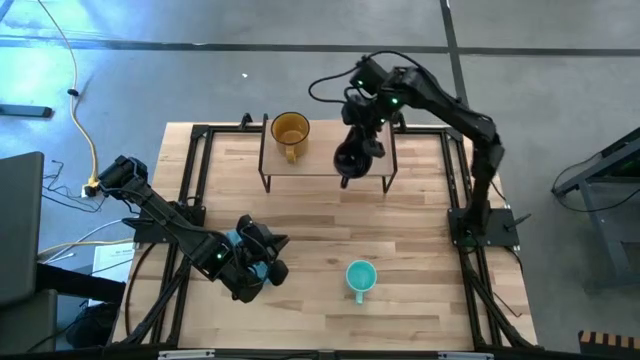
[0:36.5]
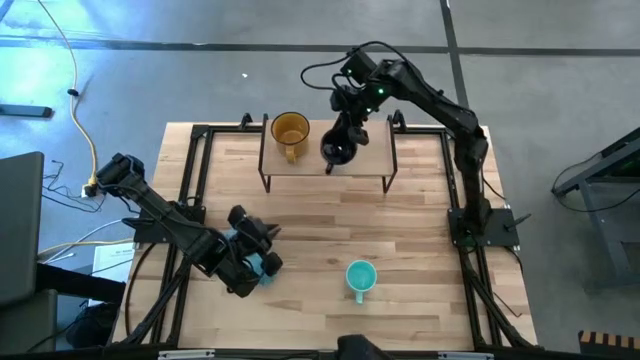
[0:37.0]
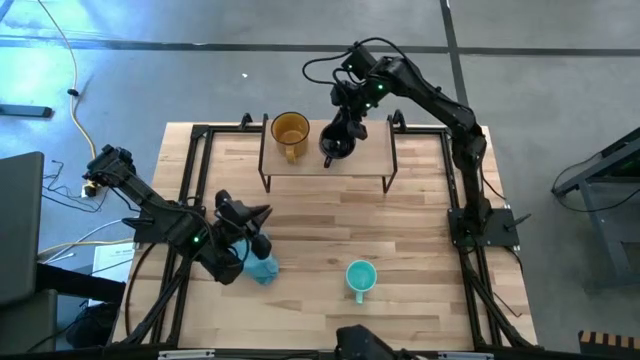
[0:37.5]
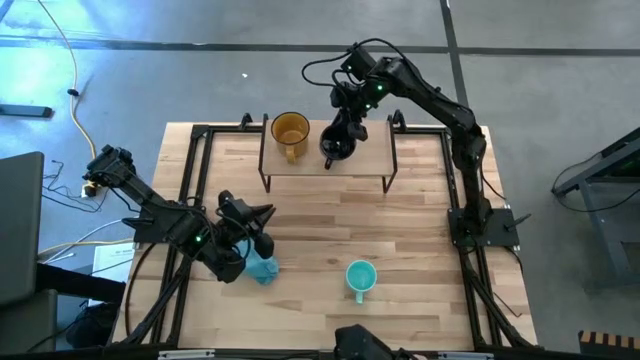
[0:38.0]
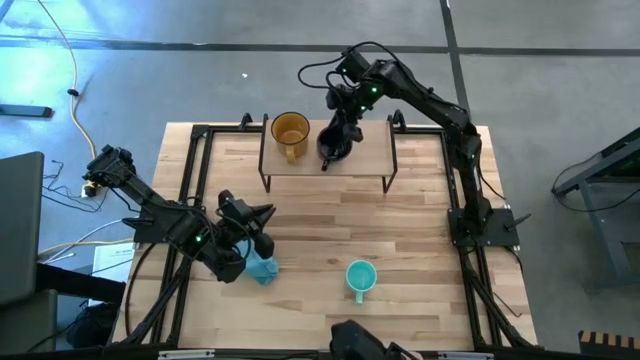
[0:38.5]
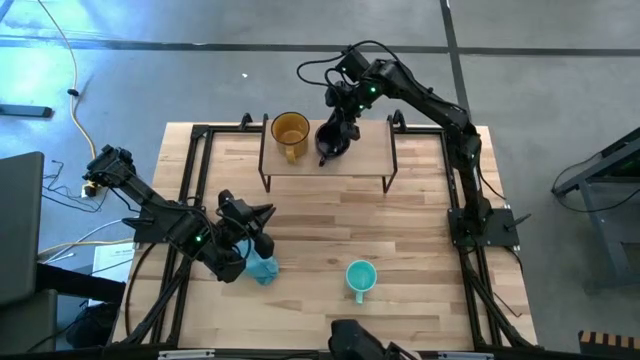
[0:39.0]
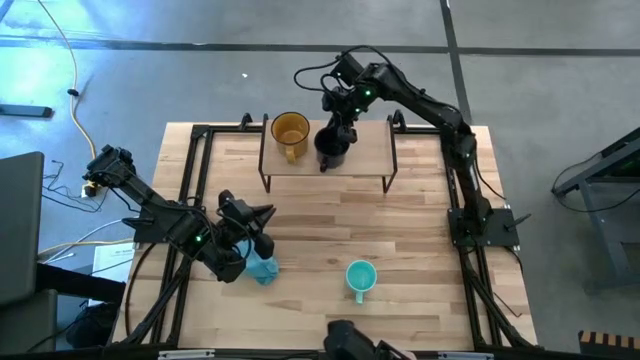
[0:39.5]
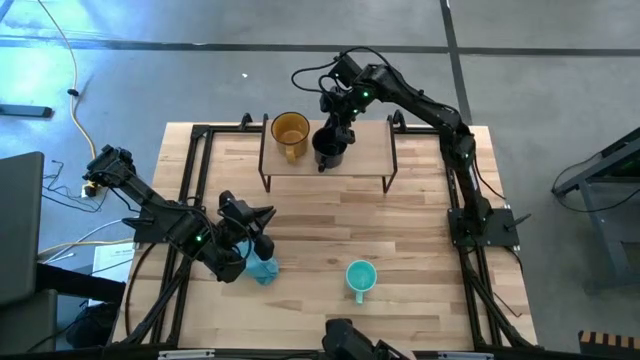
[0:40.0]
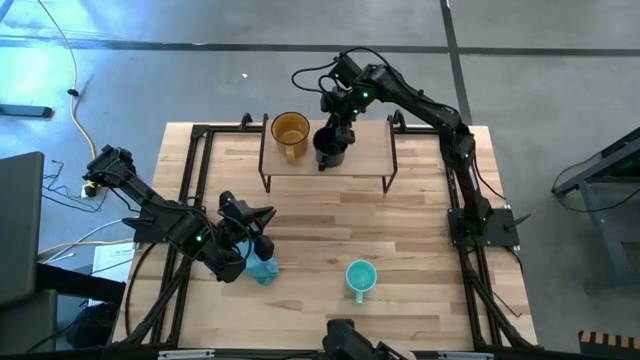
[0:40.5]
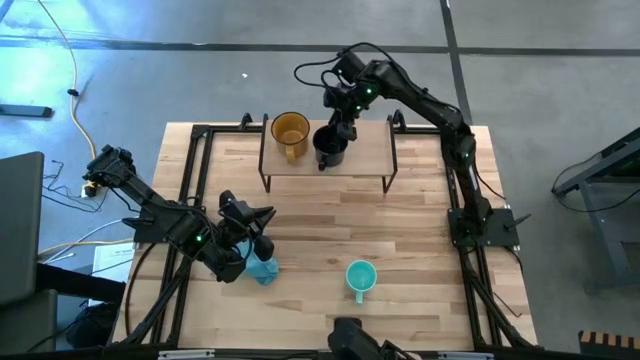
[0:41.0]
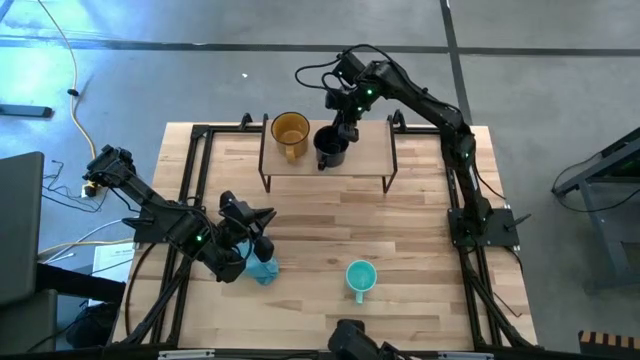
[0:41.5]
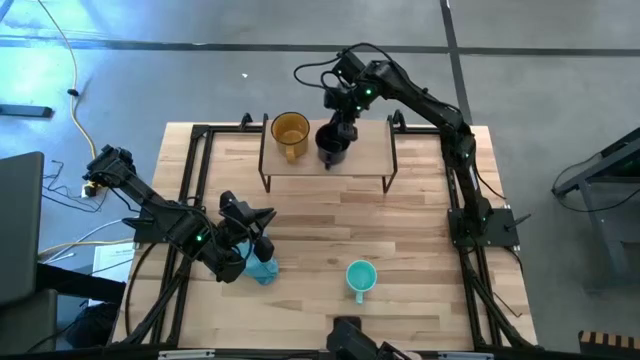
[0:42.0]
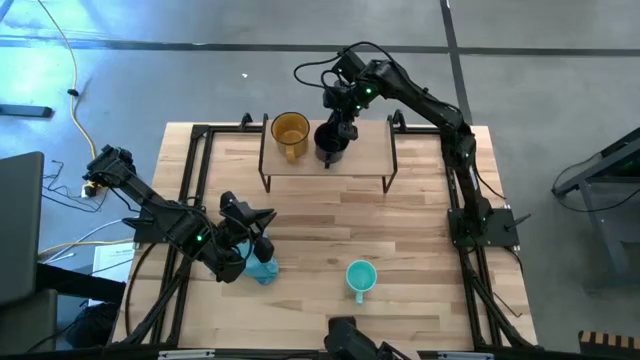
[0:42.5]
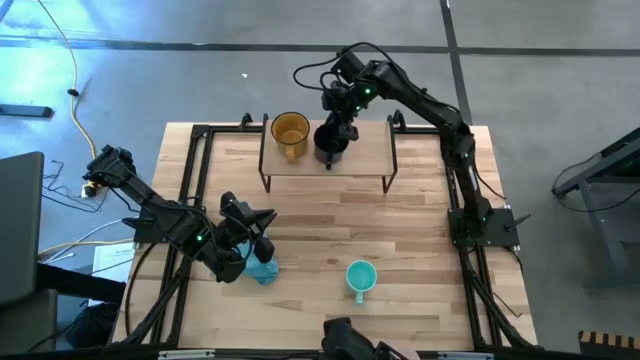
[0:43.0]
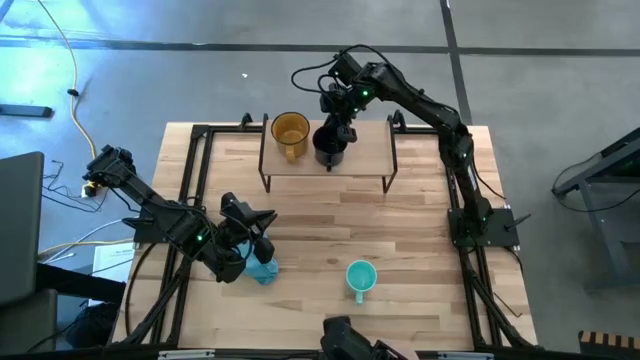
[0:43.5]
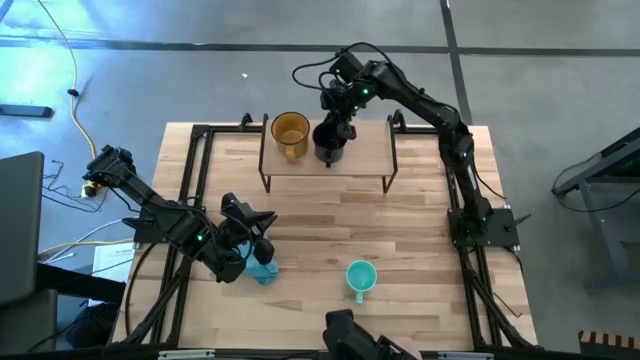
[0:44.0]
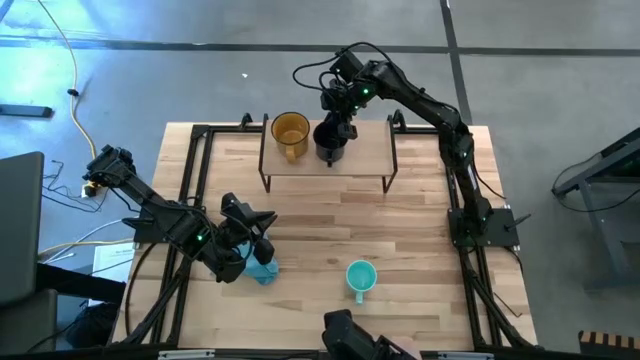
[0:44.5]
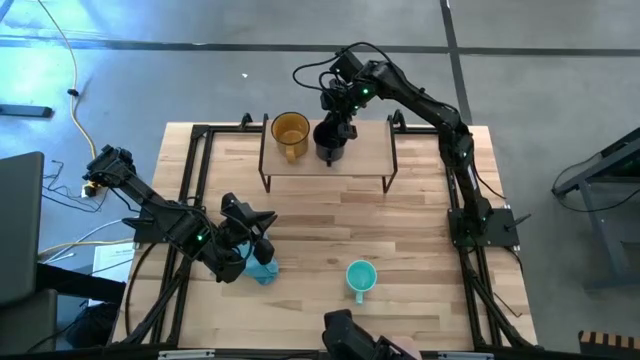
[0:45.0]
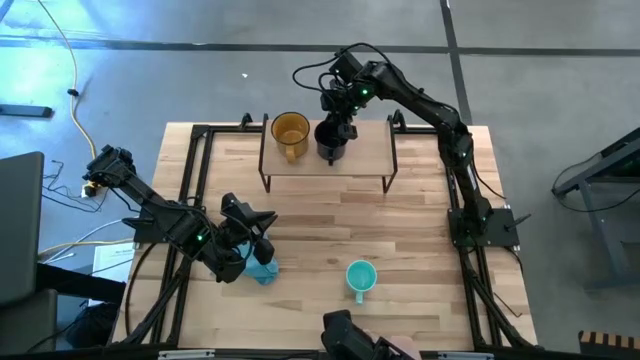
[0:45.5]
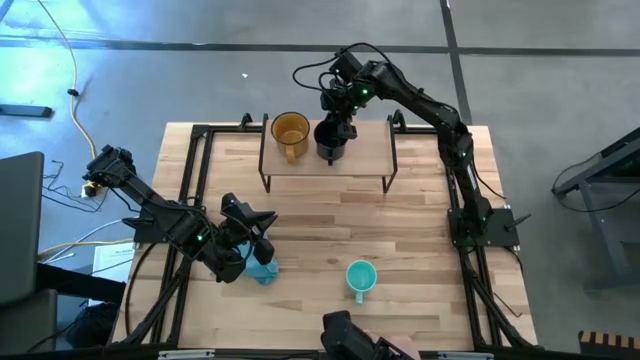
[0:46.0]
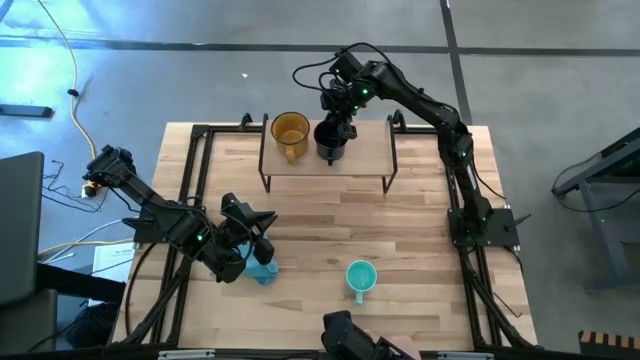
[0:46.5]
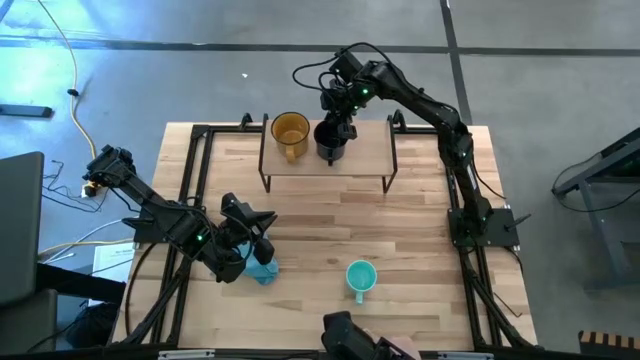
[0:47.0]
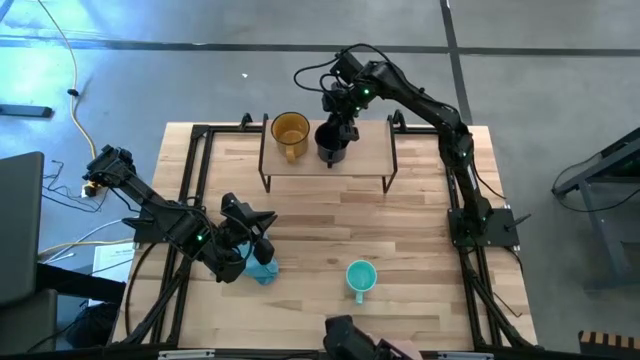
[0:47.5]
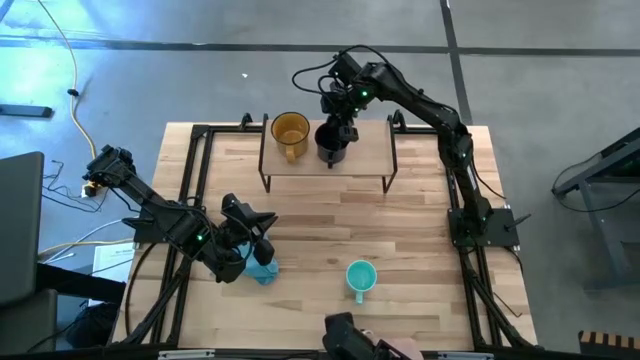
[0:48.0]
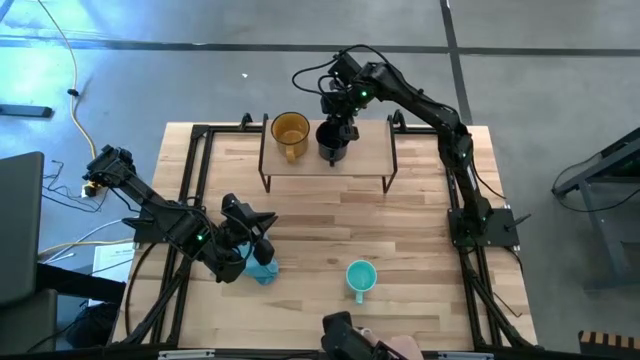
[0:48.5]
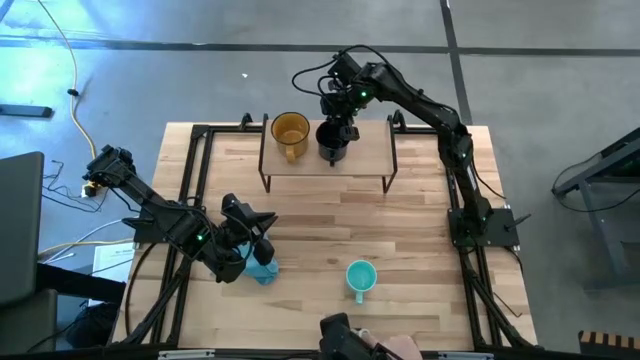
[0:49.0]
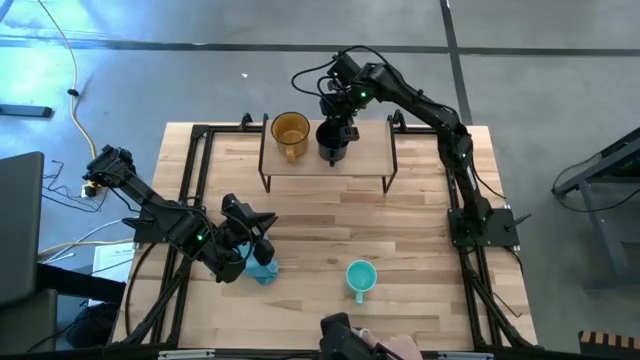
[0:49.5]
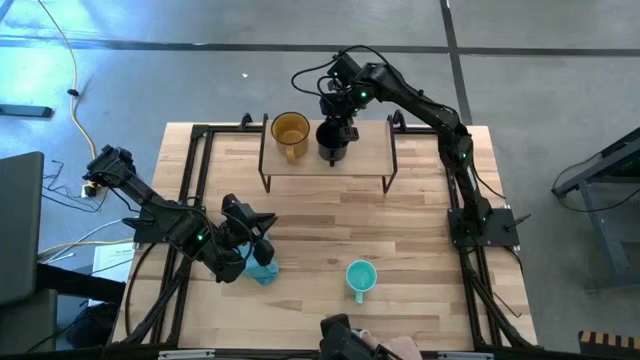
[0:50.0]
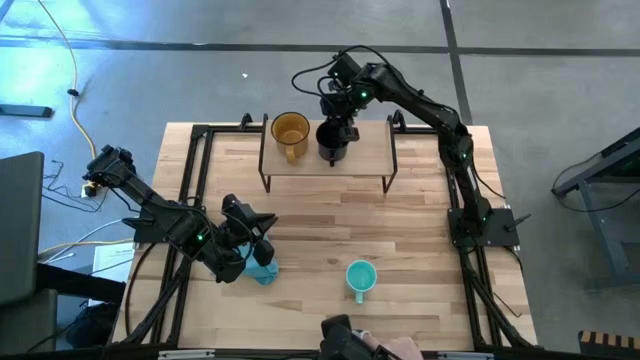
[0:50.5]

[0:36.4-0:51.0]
Task: Stack small to large cups/mugs on shelf
Put the black cup on the shelf

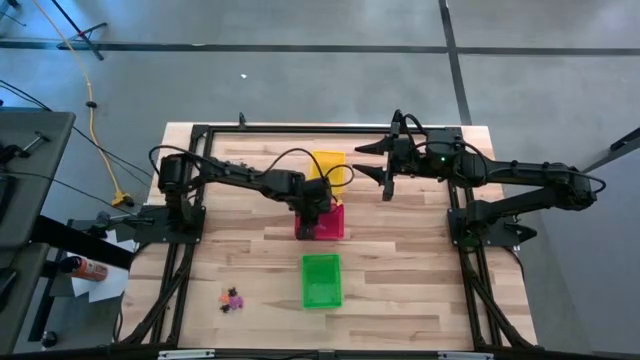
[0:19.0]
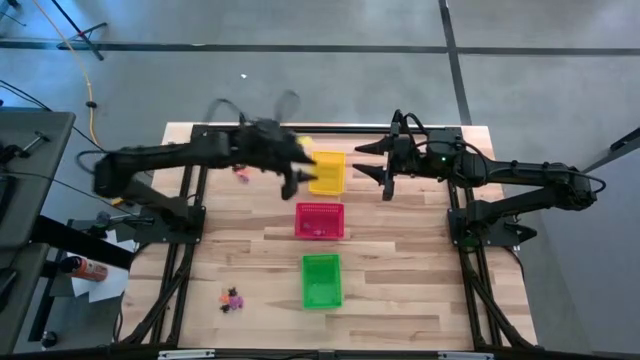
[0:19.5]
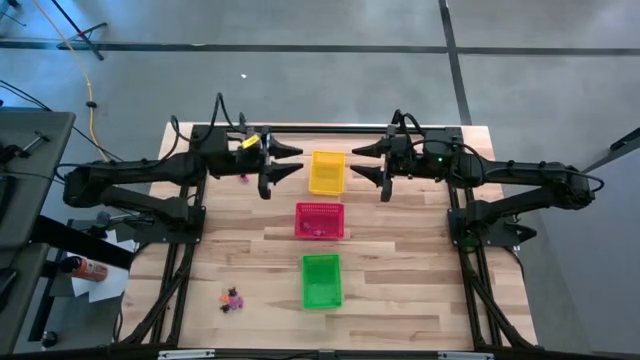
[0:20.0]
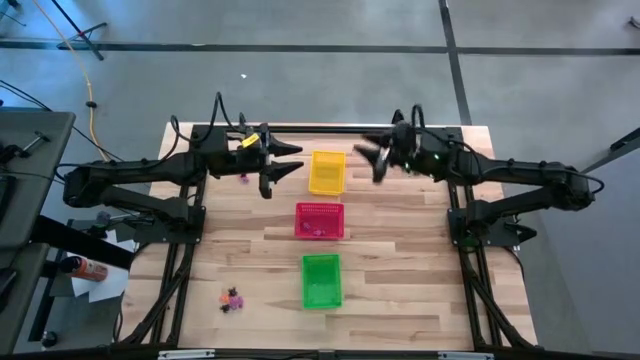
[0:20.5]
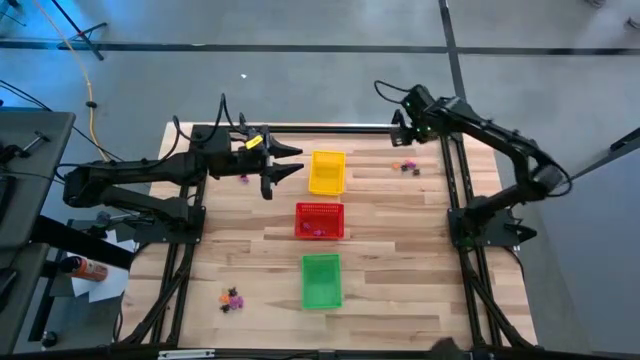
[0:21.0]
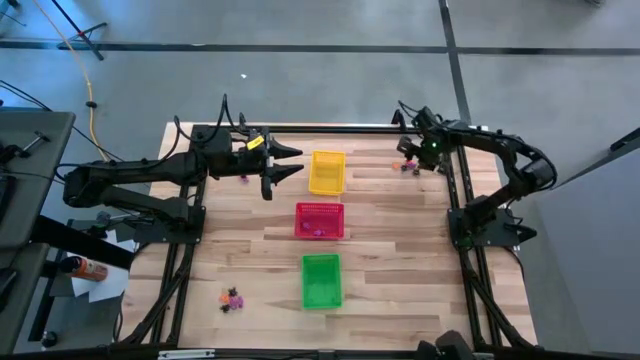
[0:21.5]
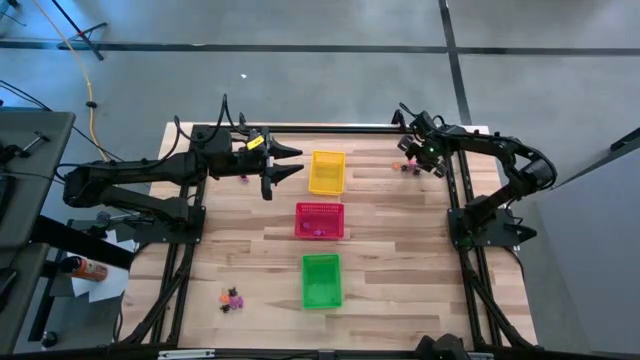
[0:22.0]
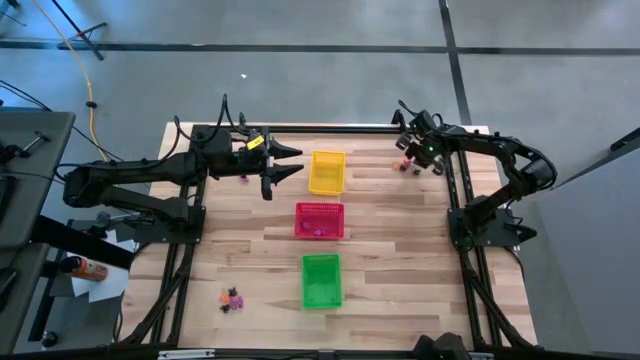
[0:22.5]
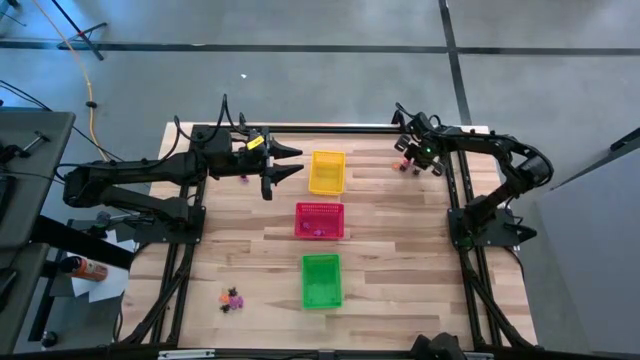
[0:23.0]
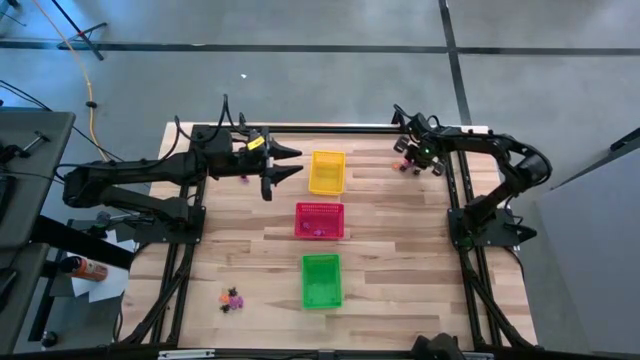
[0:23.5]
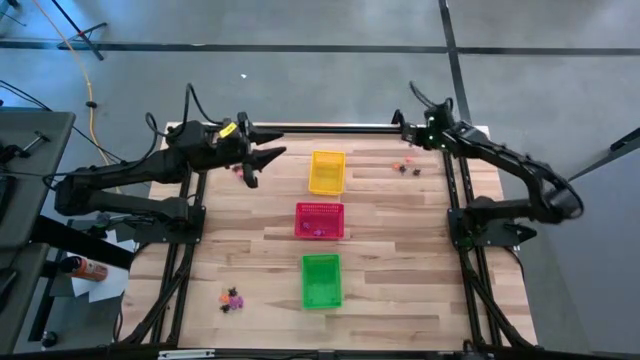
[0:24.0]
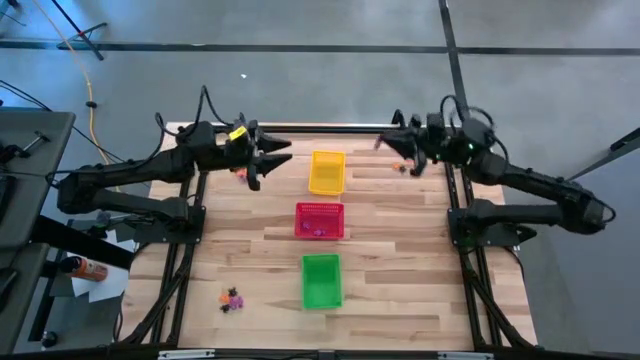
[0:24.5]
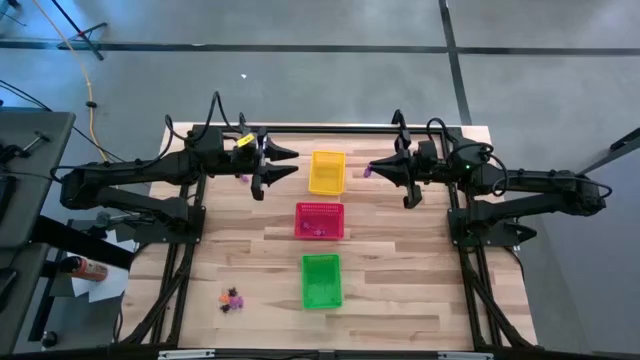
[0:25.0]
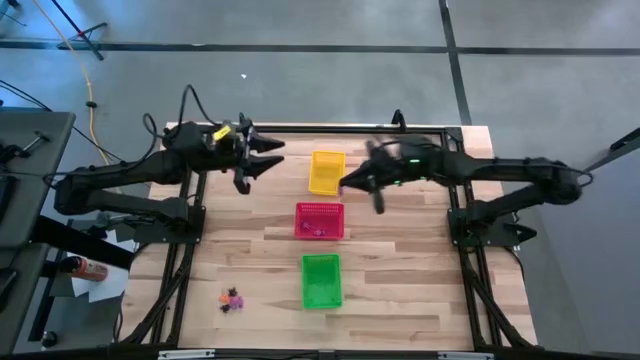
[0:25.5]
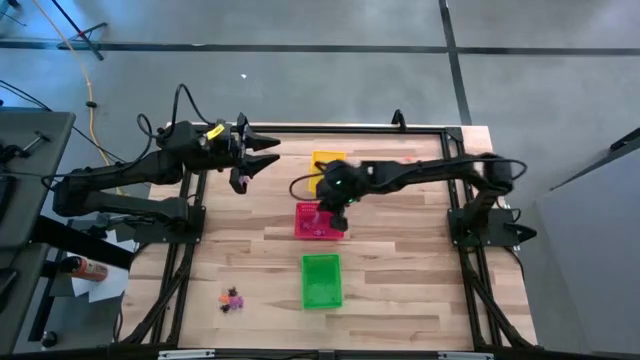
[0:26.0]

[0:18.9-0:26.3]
Task: Sort Halloween decoration
Put the purple skeleton toy into the red bin
